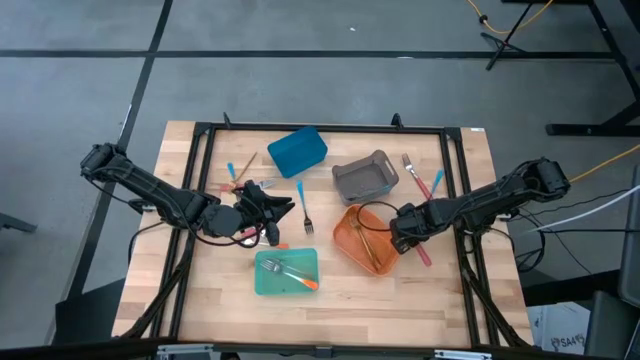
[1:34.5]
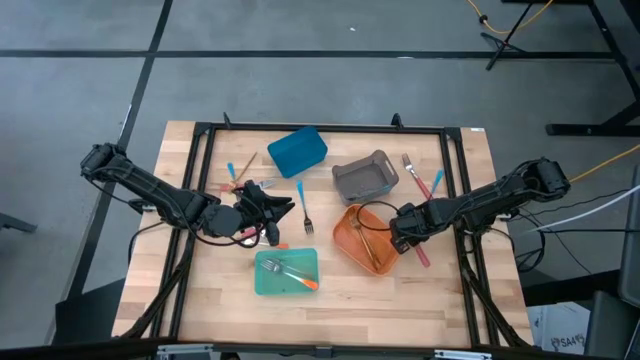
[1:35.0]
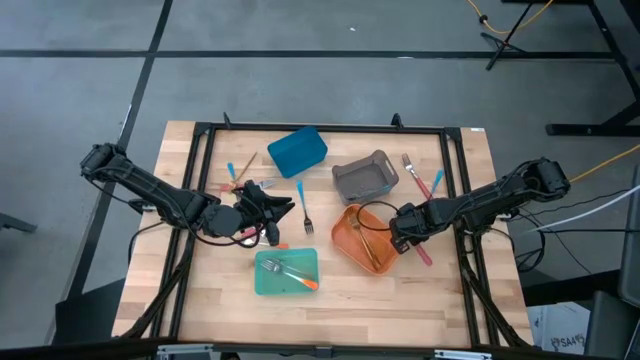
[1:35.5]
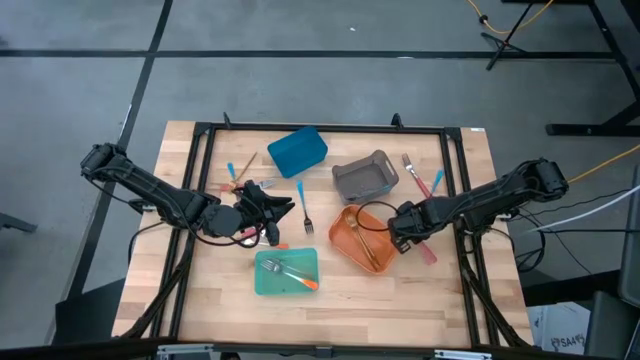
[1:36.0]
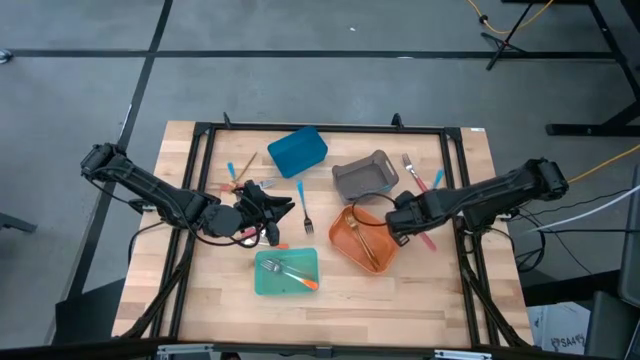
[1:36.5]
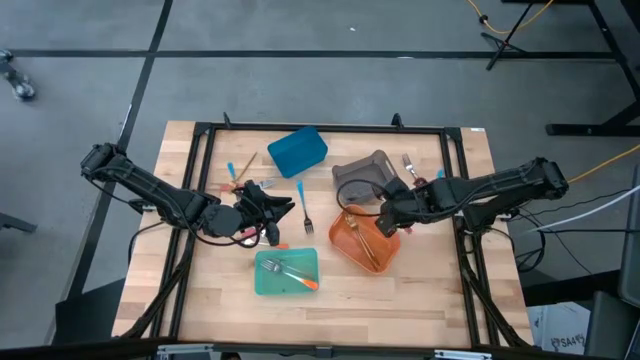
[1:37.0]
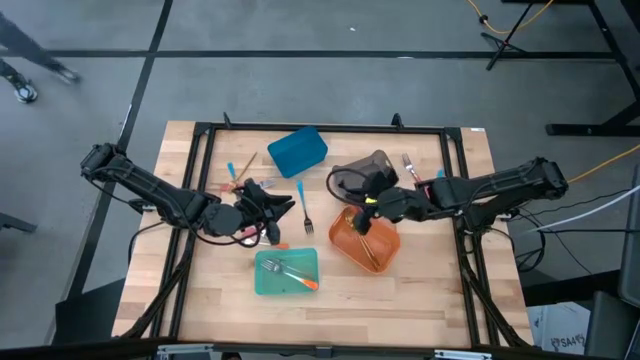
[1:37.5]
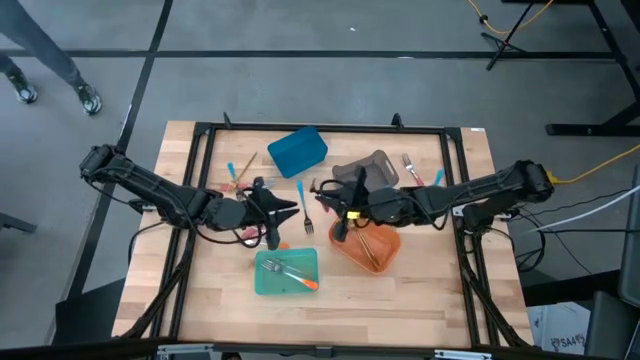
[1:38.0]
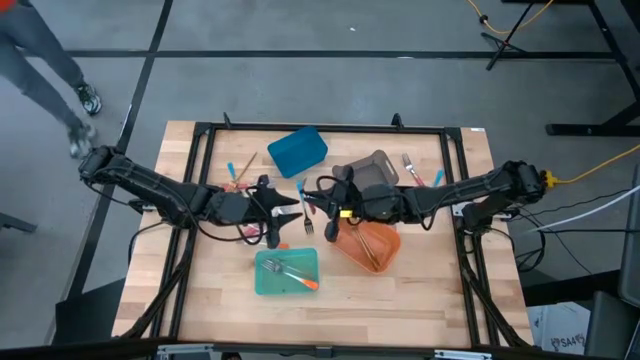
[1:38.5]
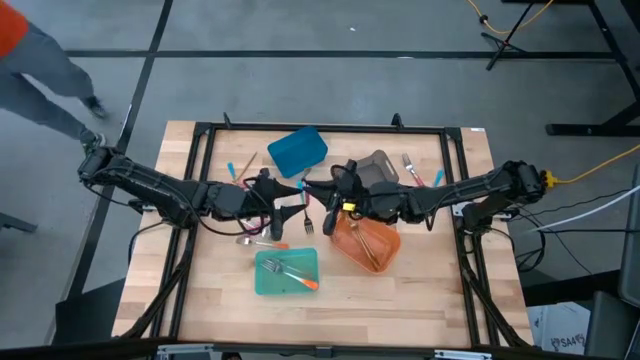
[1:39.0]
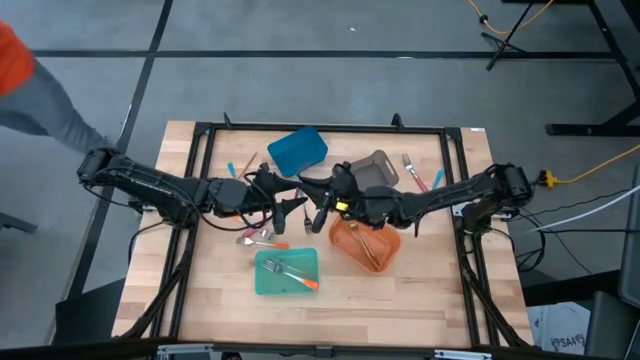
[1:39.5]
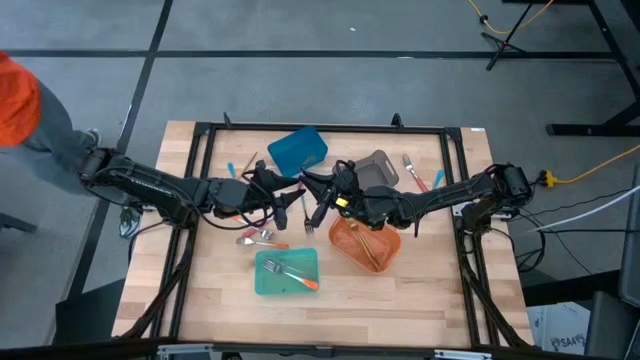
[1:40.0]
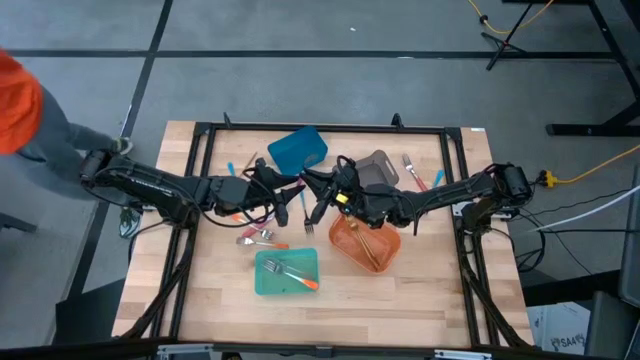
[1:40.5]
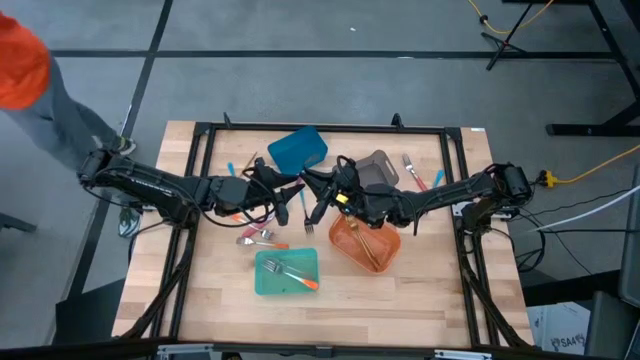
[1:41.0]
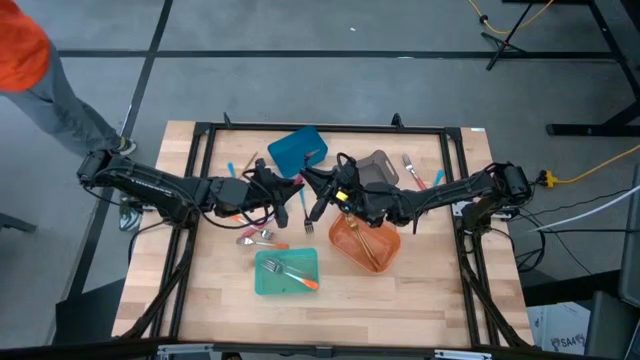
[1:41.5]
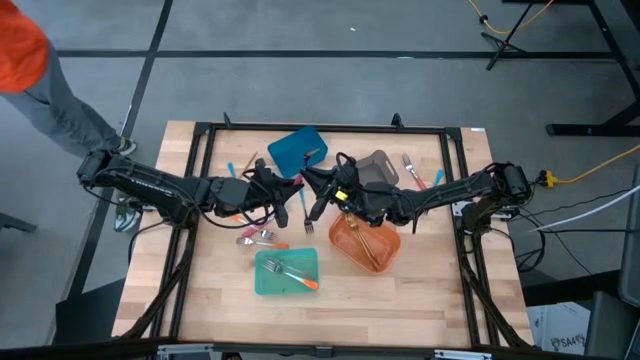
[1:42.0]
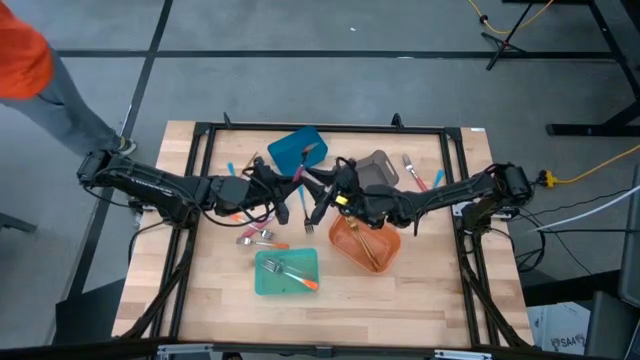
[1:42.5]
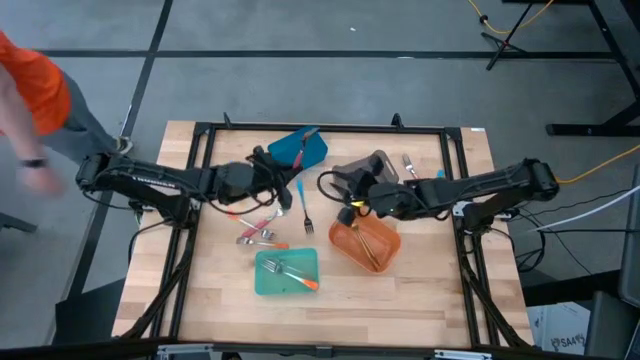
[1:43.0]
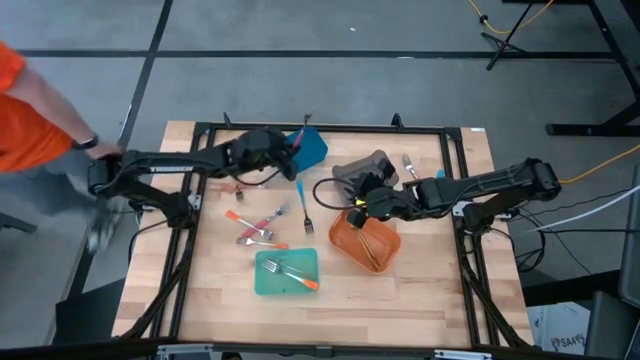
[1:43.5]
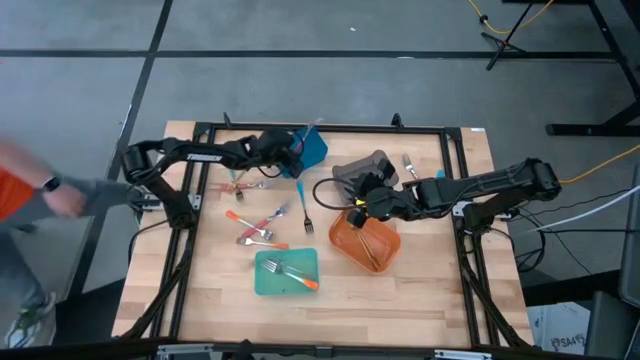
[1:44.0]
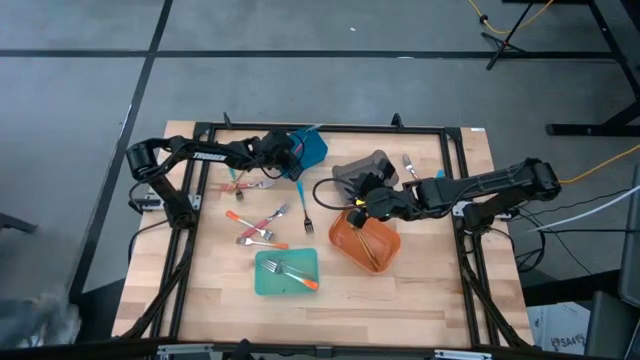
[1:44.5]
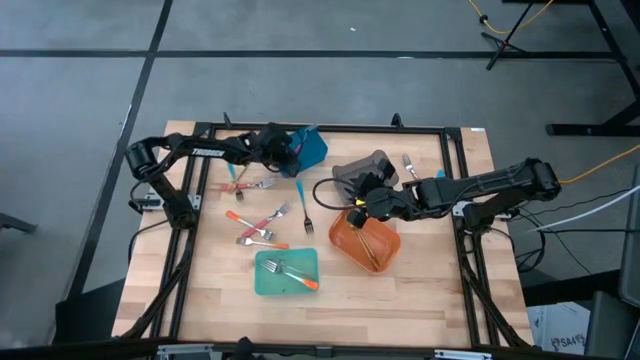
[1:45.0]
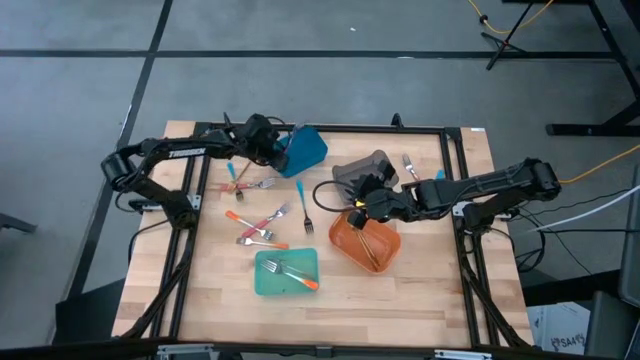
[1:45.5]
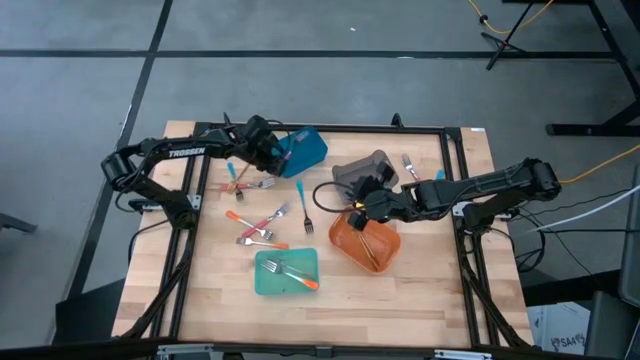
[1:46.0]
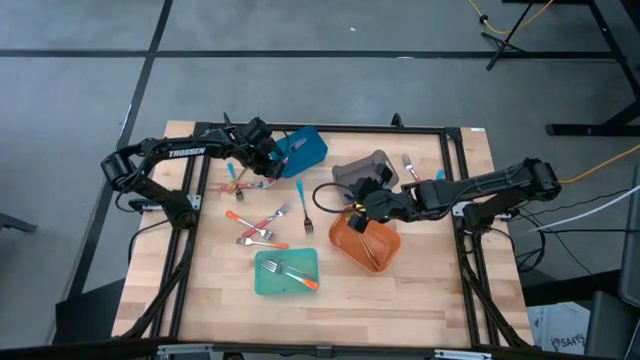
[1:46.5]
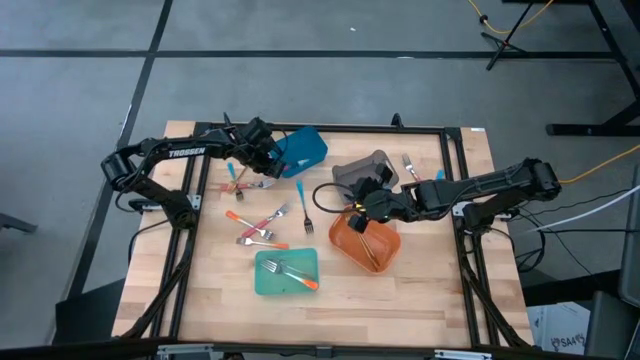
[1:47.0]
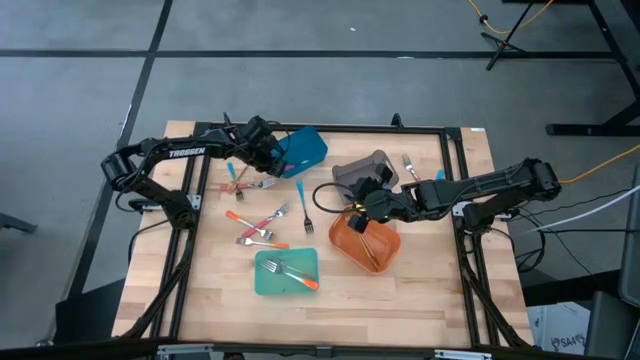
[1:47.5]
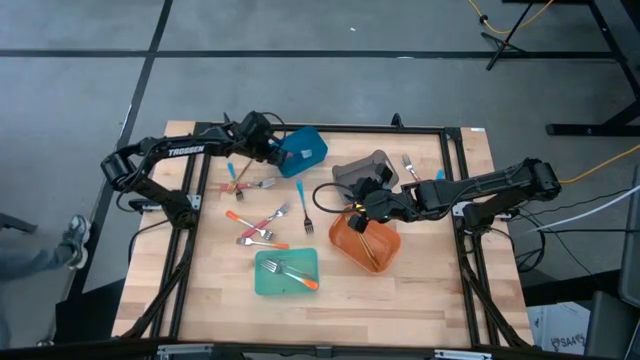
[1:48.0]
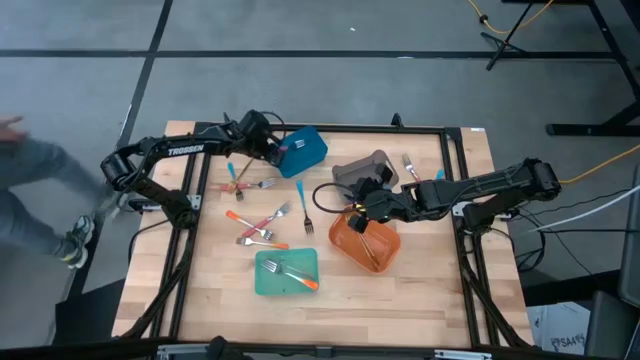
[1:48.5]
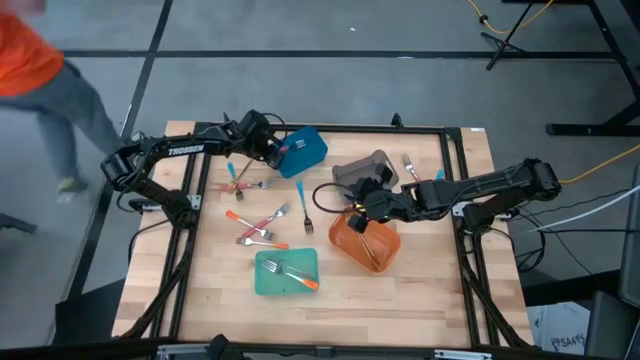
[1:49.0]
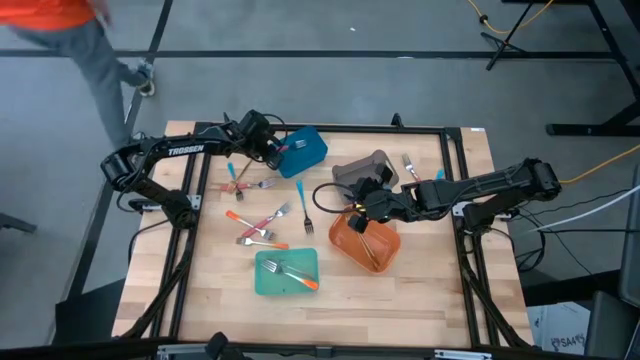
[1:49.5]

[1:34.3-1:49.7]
Task: Sort silverware by color (type)
Put the pink fork into the blue bin

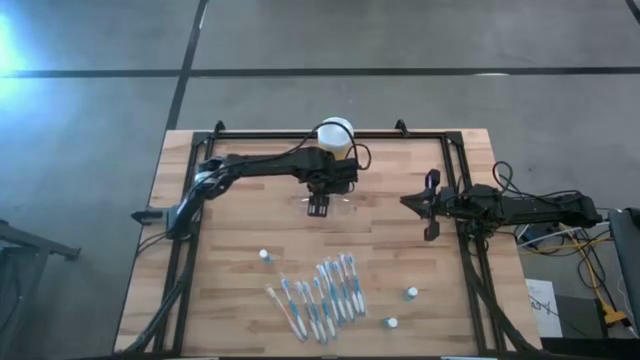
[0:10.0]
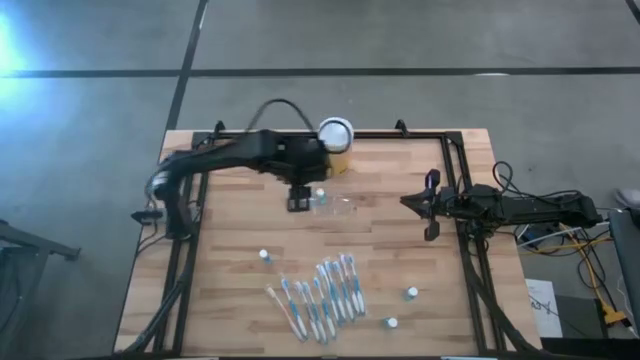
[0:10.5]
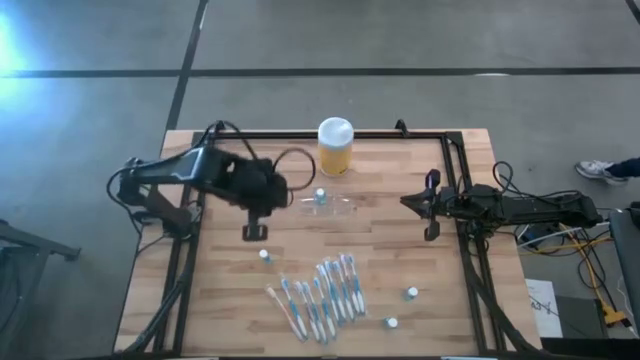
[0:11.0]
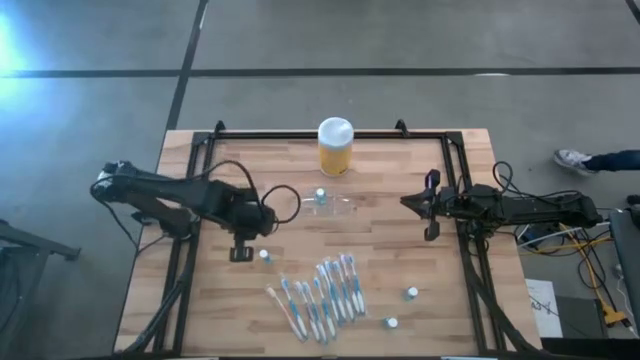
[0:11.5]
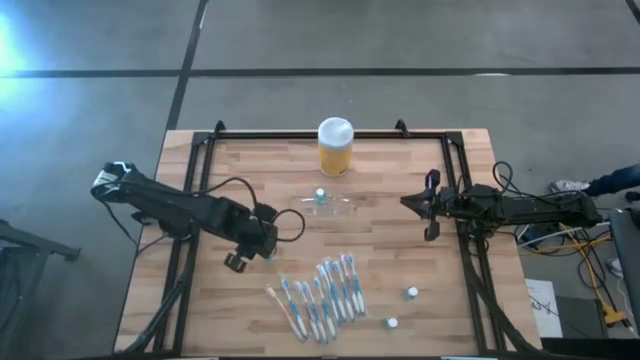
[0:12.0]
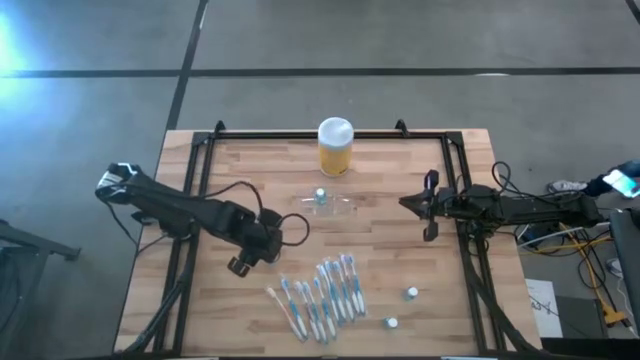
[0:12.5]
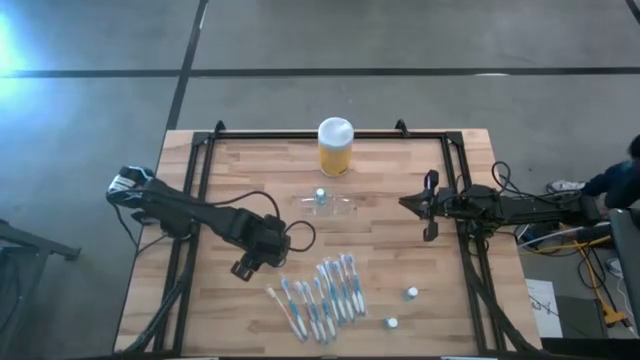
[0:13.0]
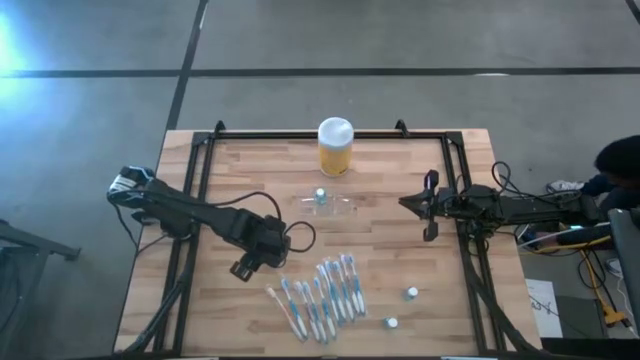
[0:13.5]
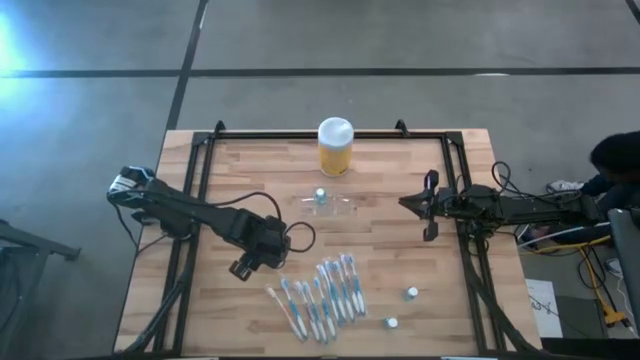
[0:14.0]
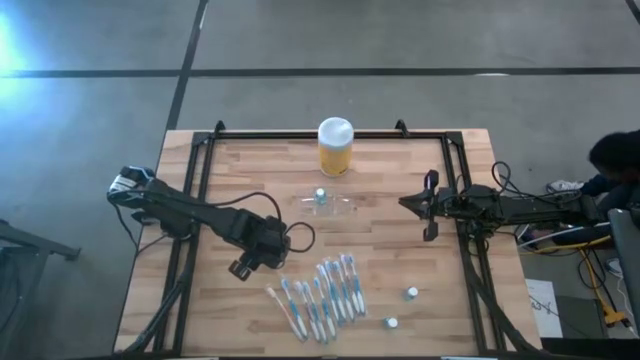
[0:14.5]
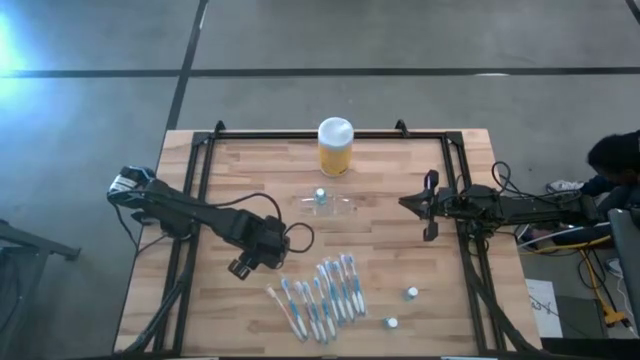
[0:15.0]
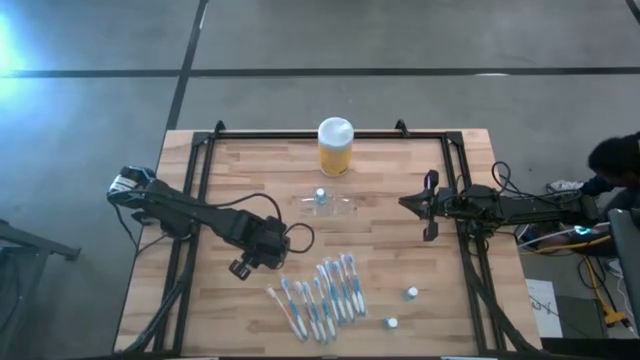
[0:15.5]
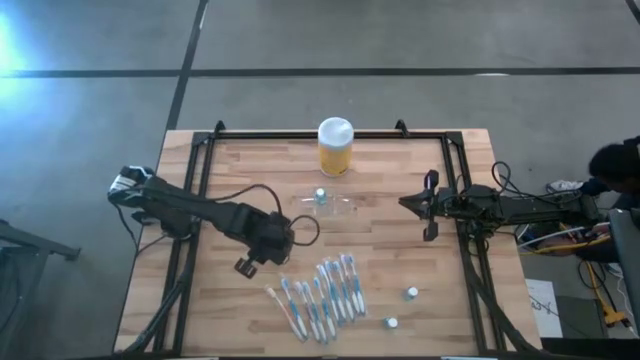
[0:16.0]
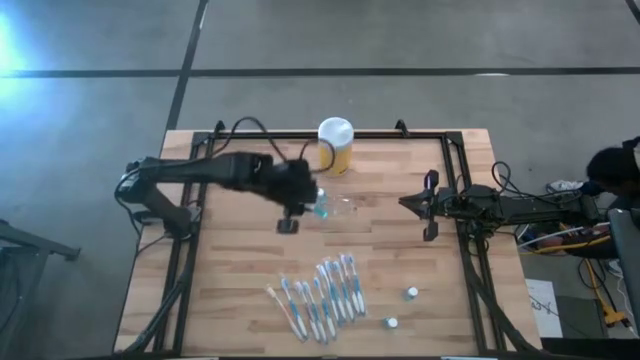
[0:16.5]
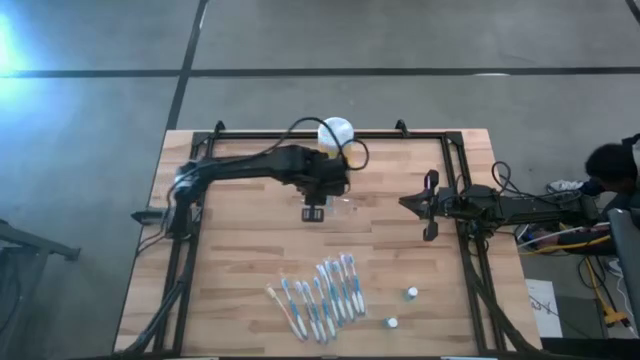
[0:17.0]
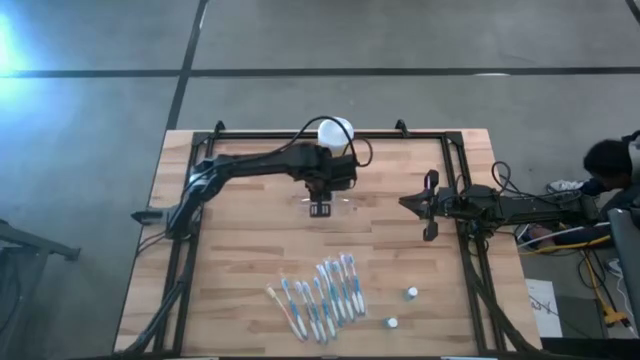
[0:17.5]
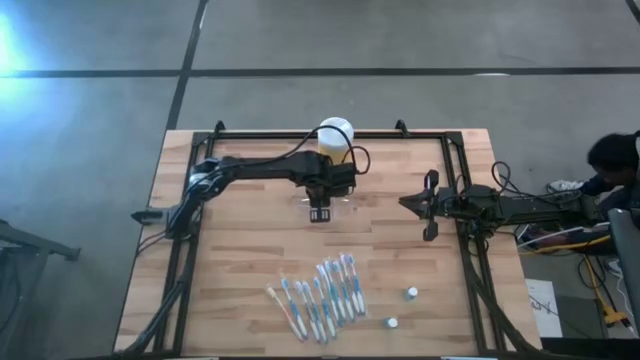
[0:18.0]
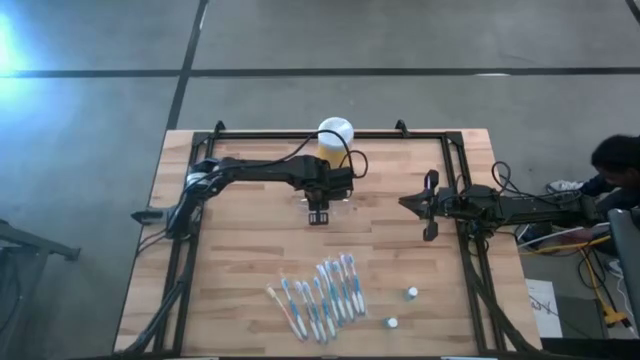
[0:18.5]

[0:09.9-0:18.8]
Task: Pick & Place toothbrushing station
Put the blue mouthwash bottle into the transparent organizer
